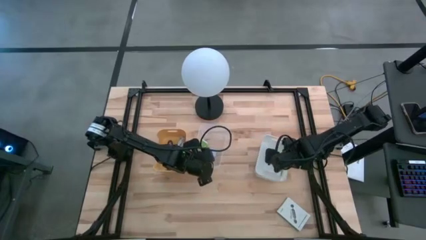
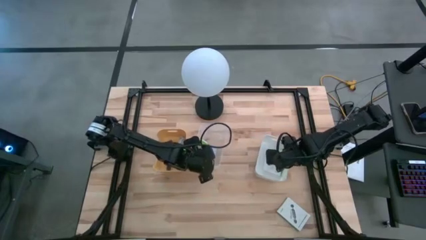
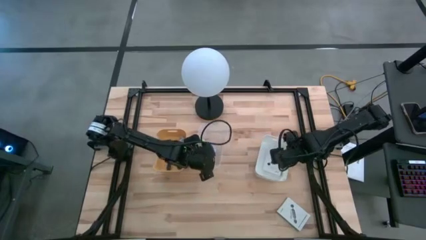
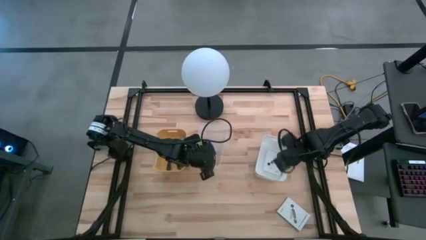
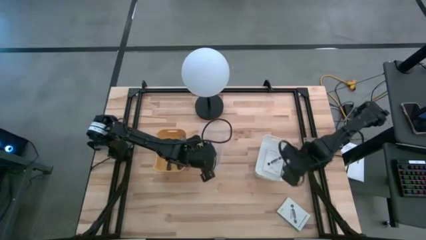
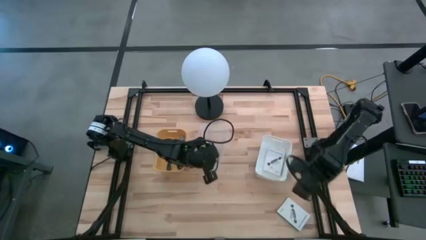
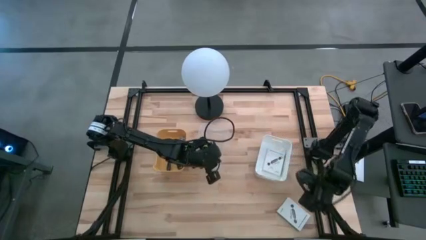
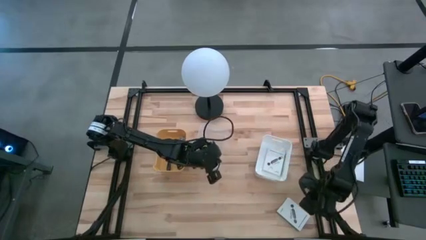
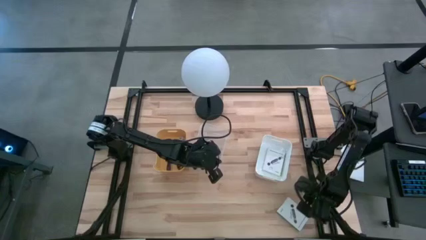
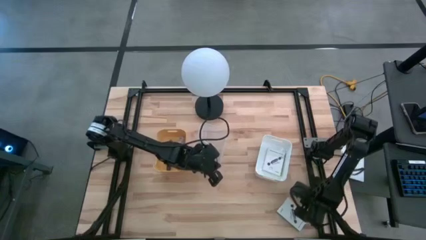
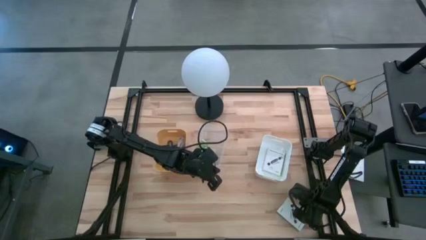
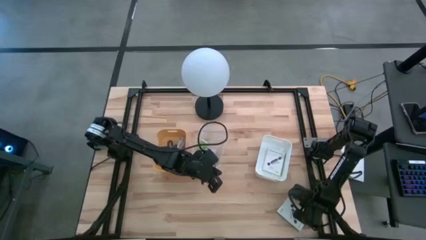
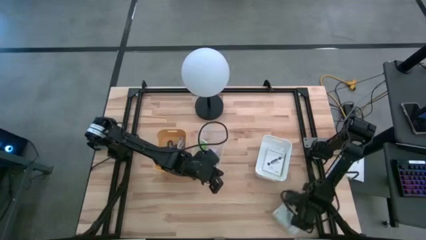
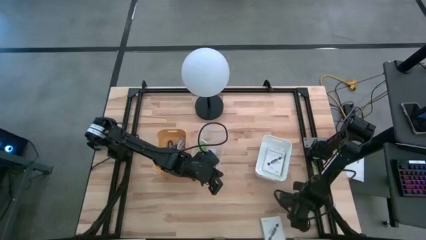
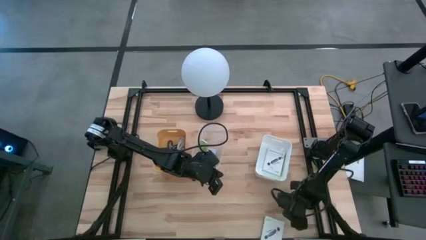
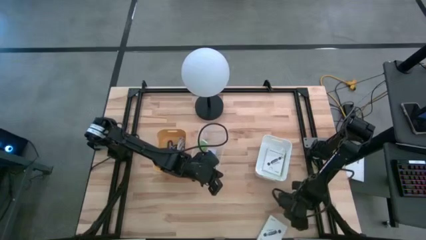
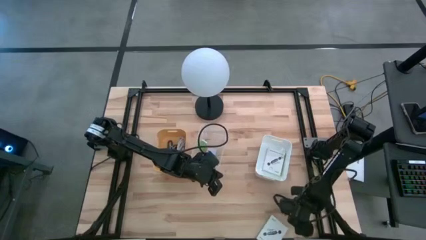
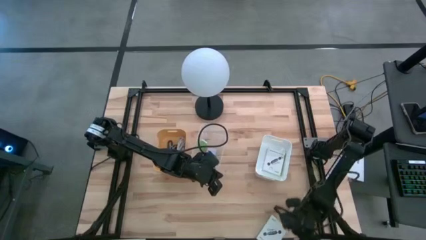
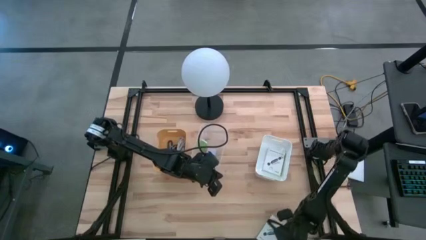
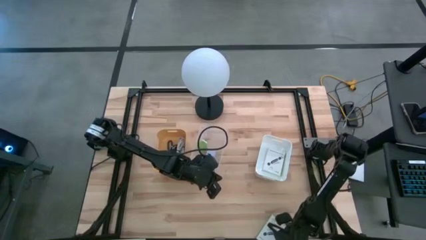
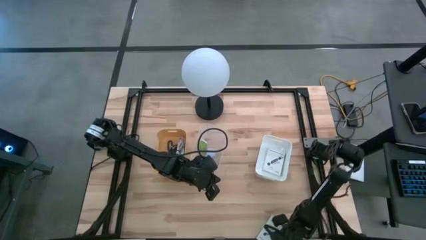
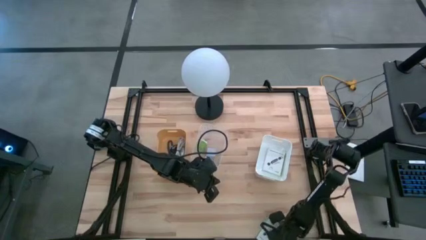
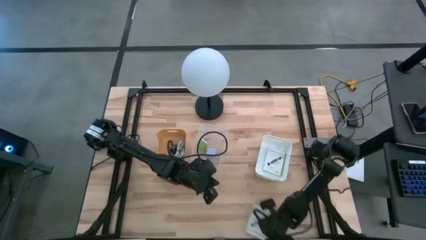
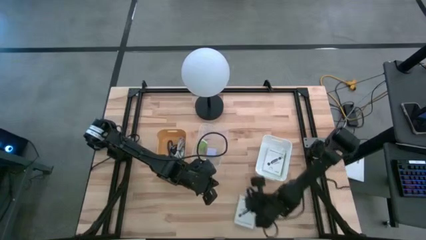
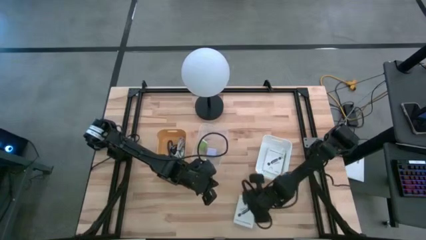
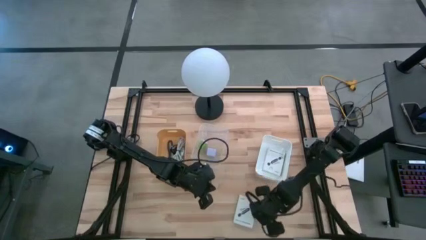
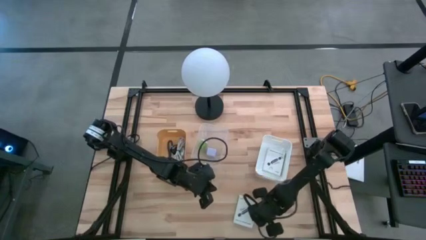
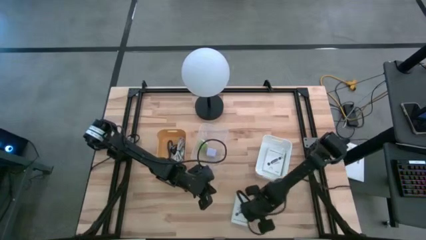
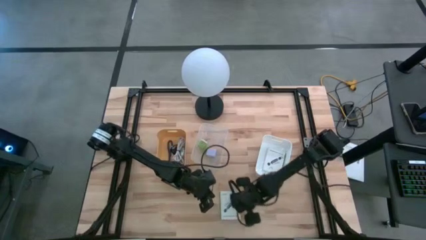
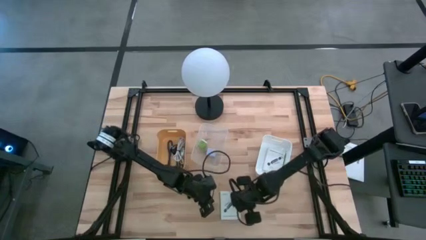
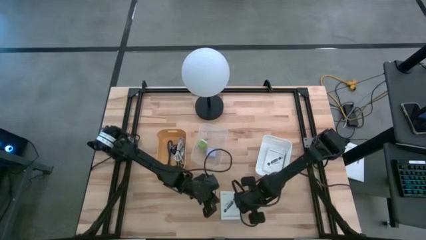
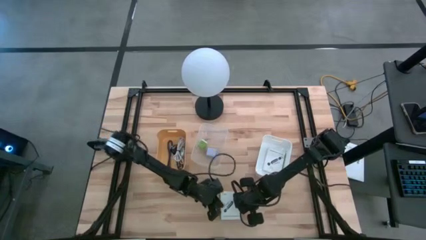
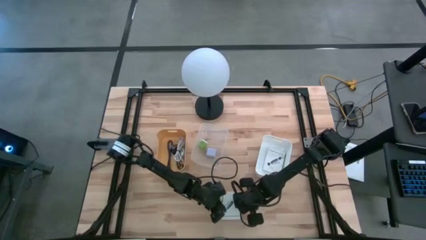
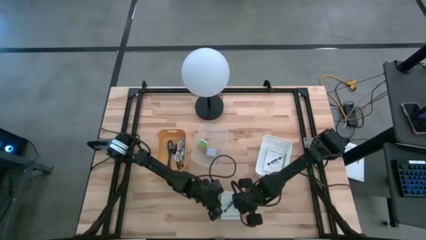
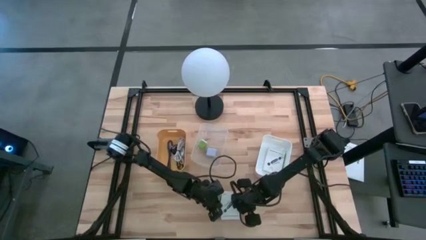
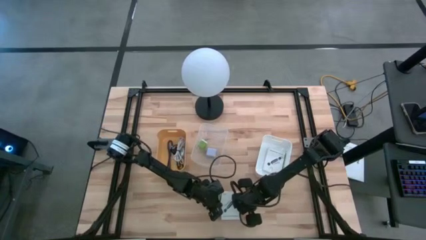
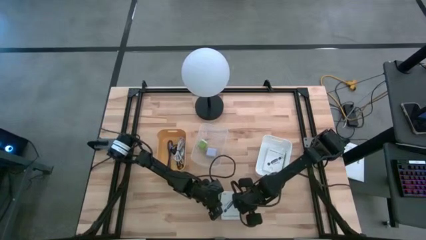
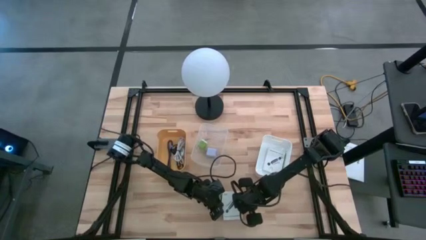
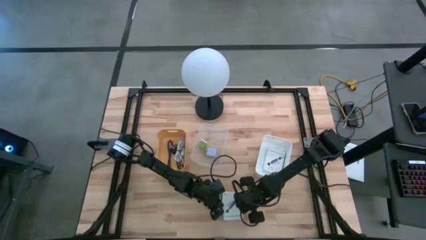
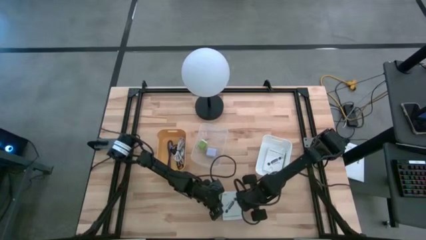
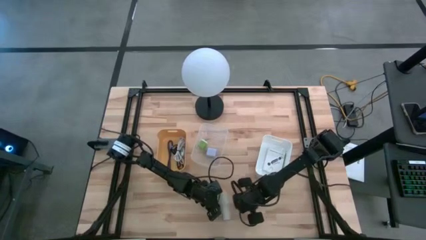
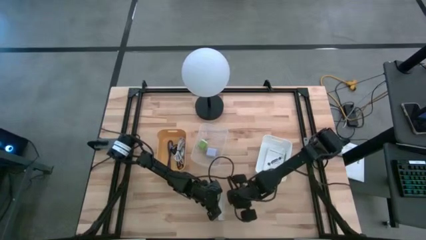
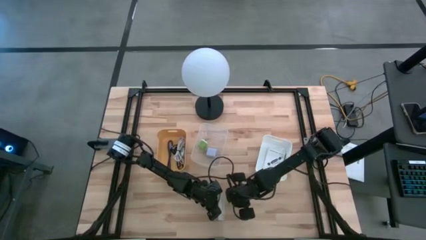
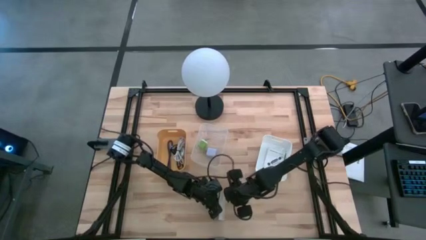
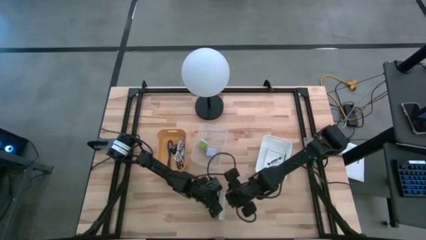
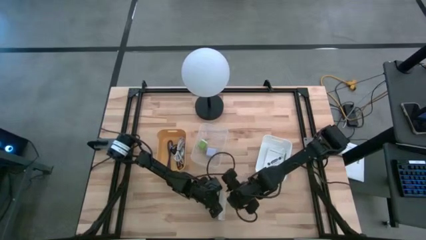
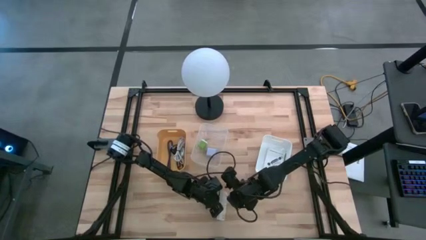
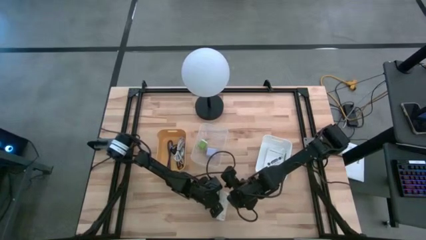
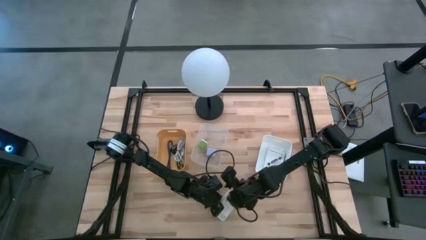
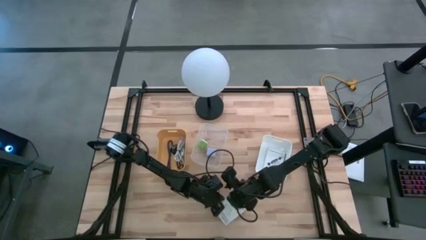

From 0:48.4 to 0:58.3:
Task: Pick and place items into bin
Put the card reader box into the white bin

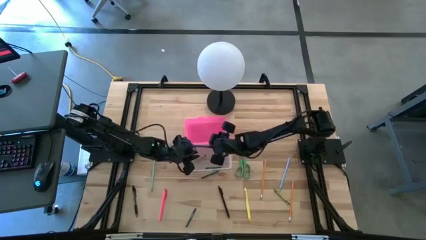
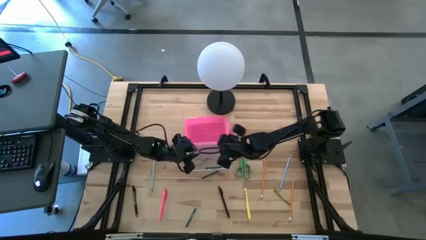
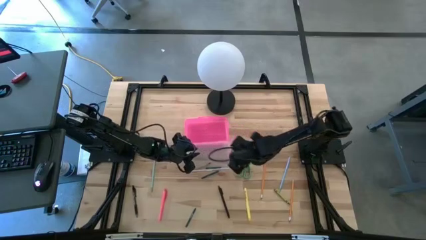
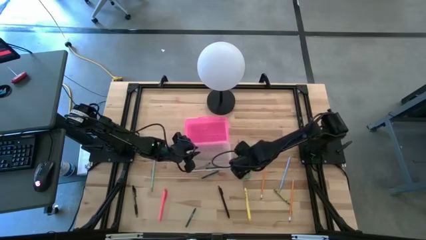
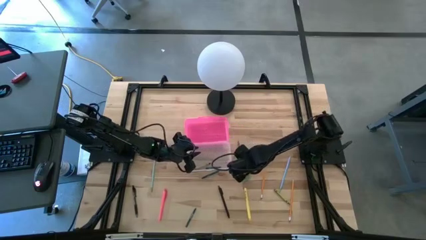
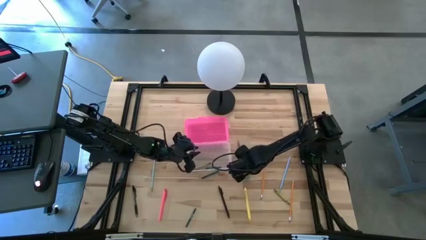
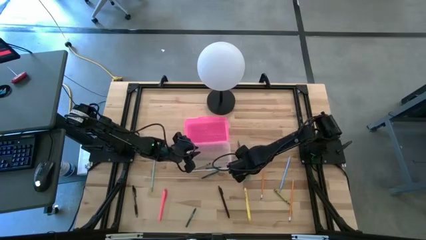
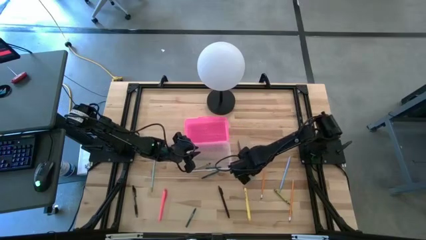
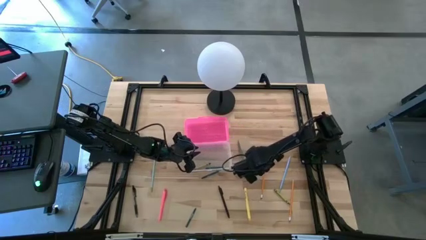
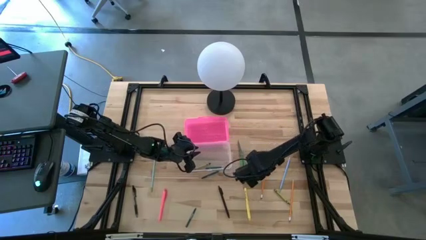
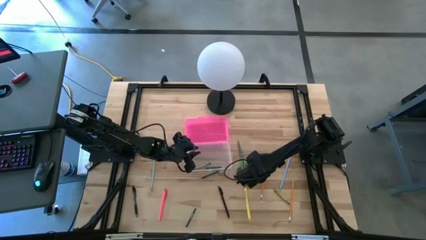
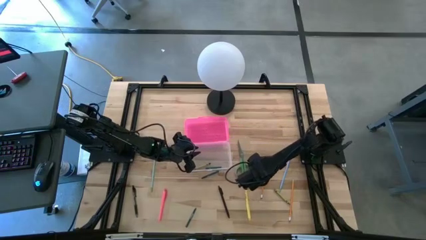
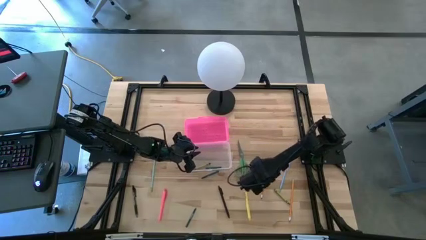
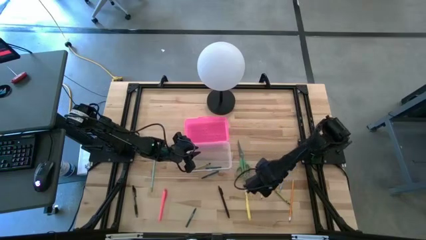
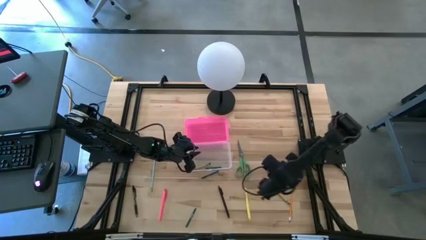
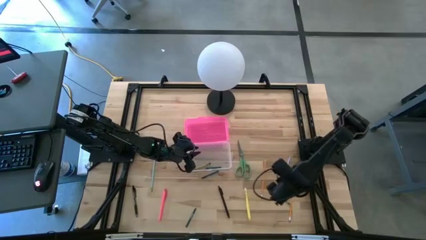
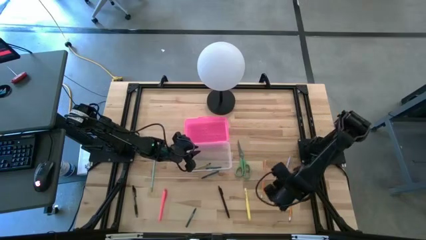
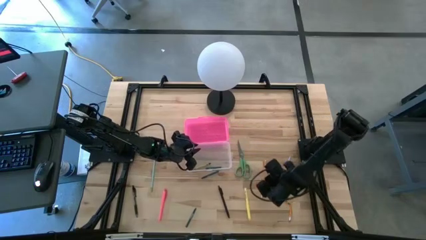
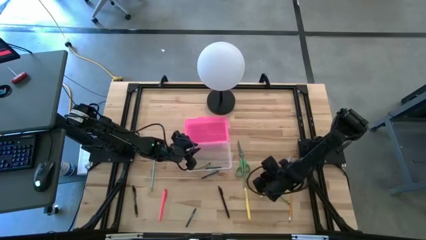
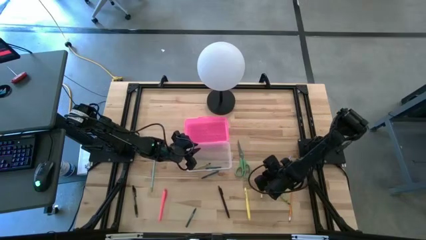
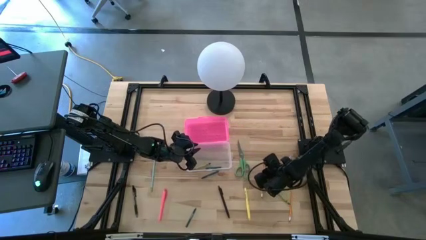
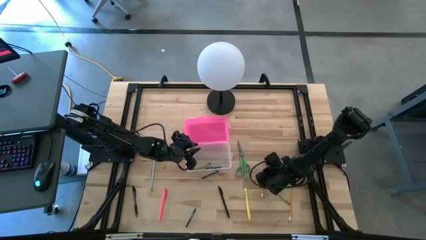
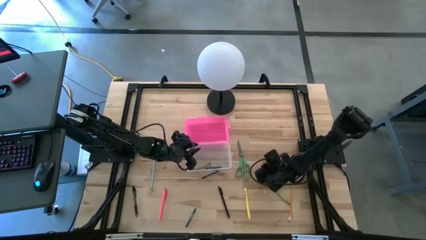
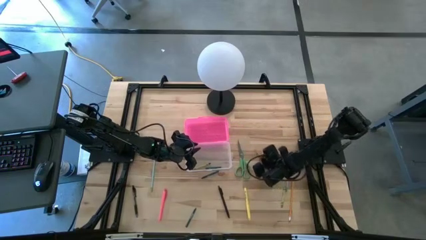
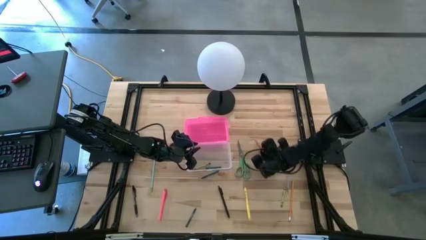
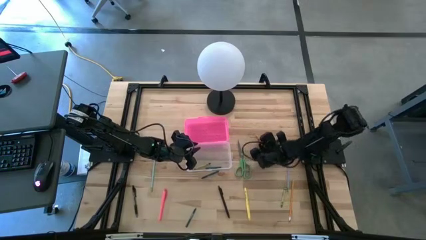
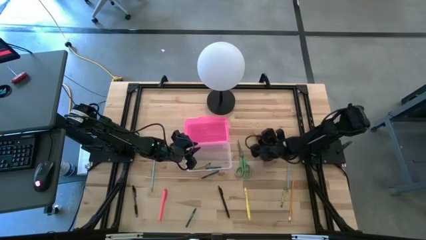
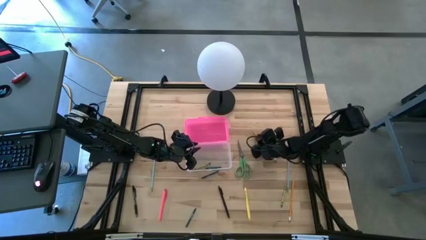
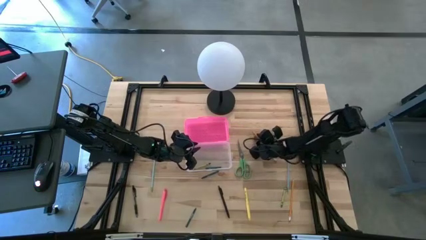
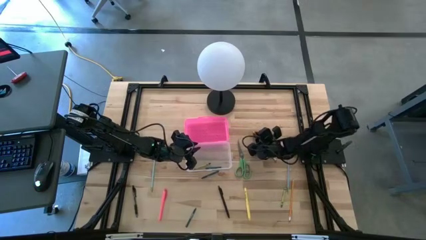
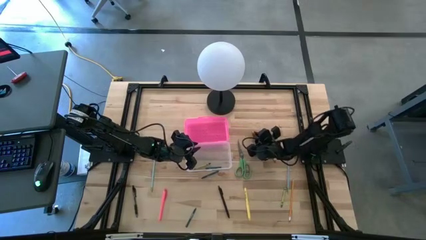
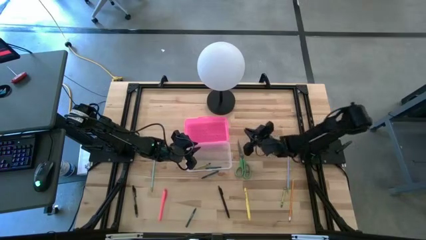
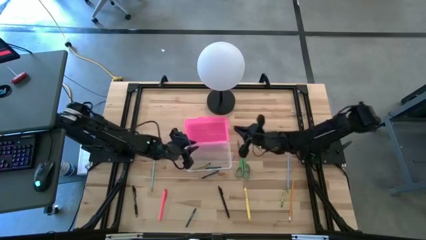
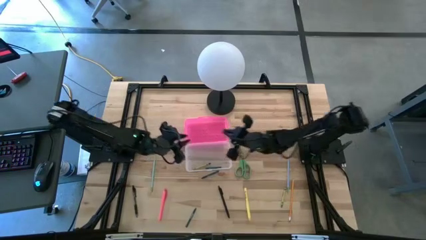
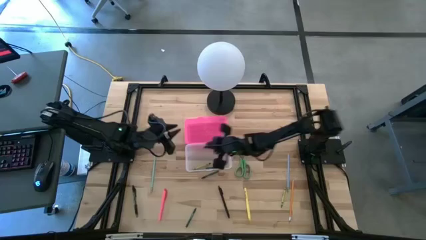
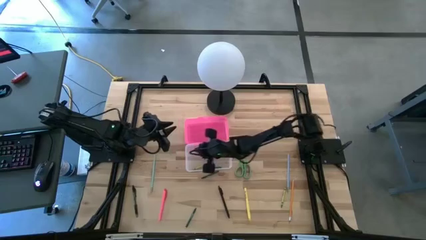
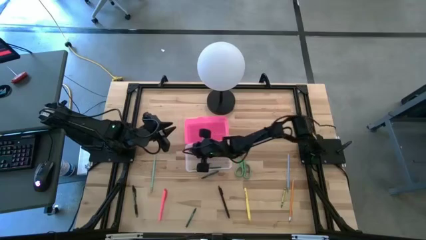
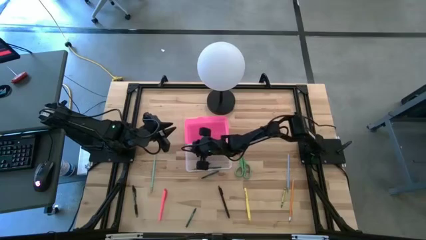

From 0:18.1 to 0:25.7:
Task: Pick & place school supplies into a supply box
Put the left orange pencil into the pink supply box
